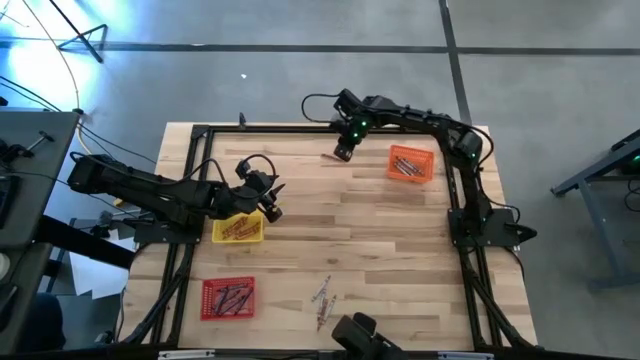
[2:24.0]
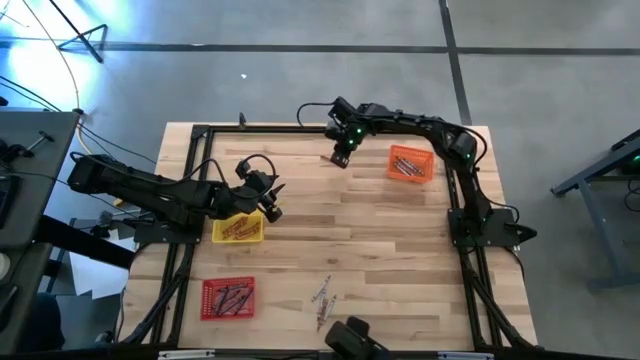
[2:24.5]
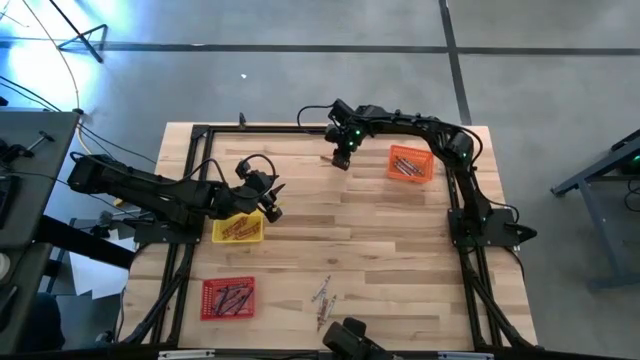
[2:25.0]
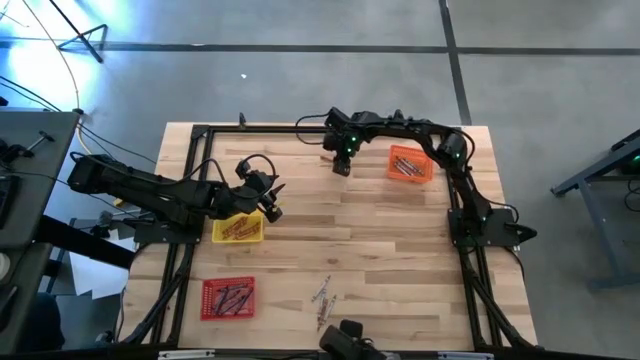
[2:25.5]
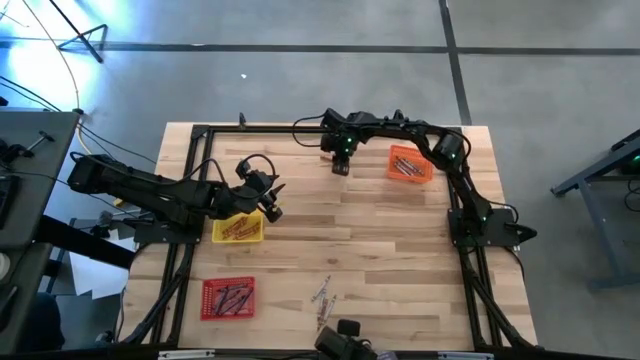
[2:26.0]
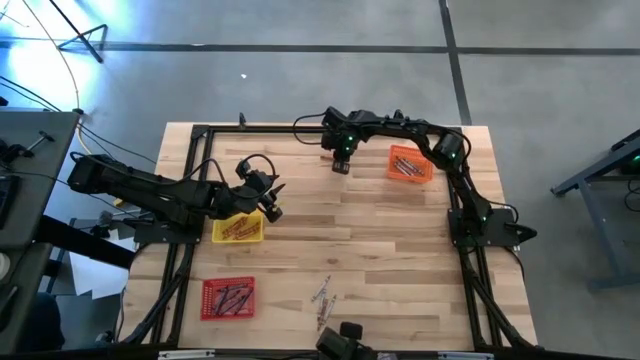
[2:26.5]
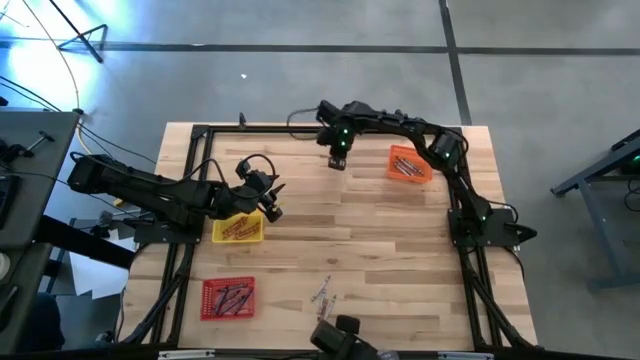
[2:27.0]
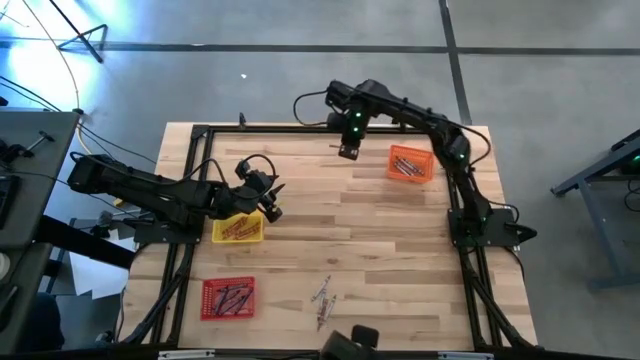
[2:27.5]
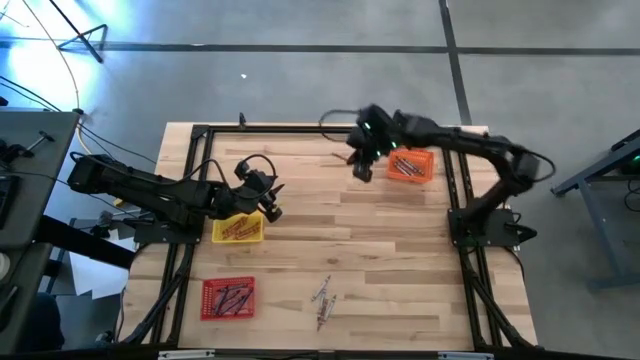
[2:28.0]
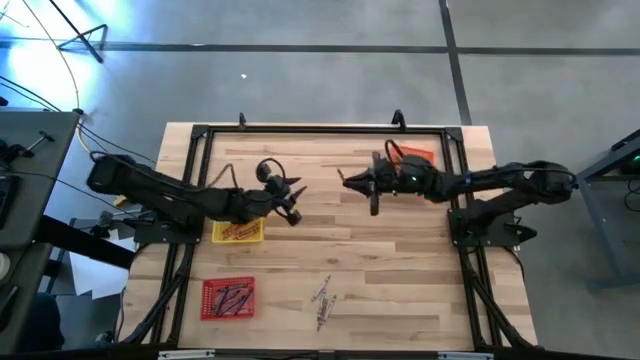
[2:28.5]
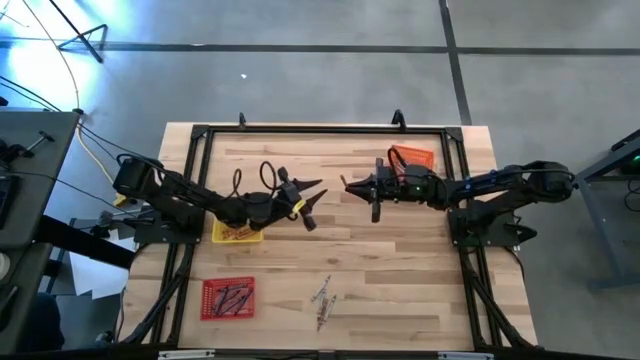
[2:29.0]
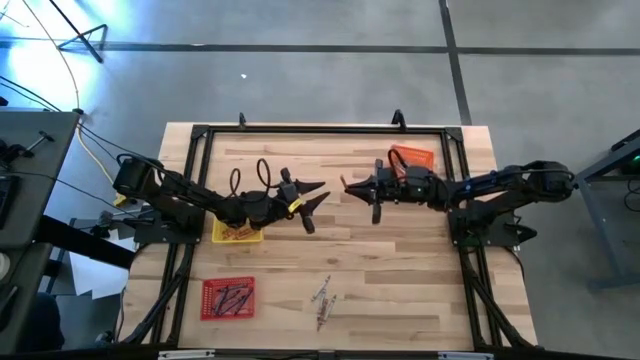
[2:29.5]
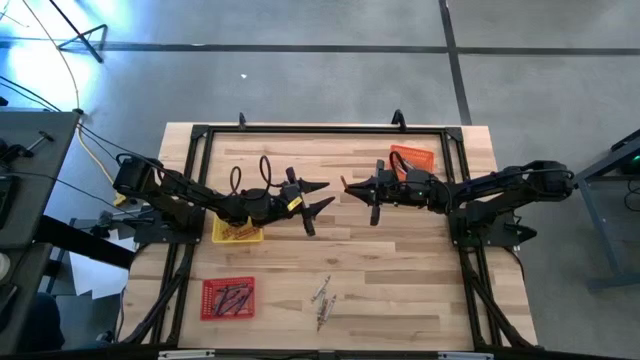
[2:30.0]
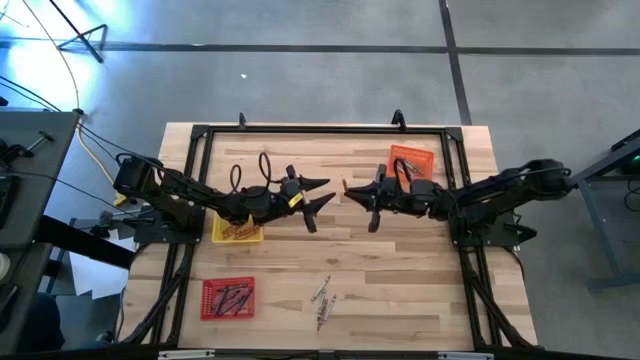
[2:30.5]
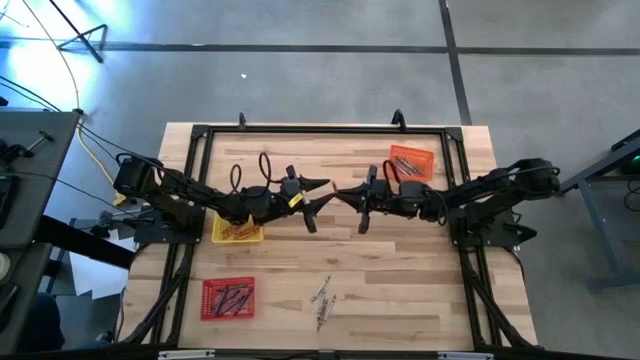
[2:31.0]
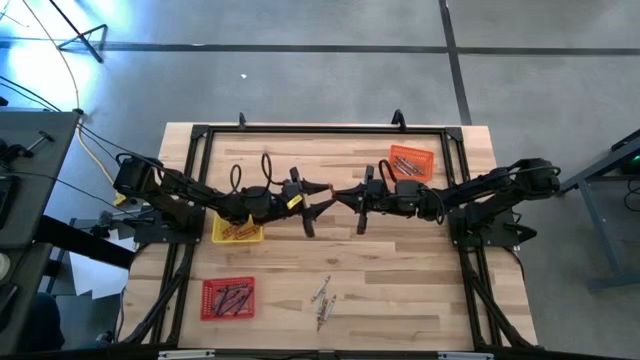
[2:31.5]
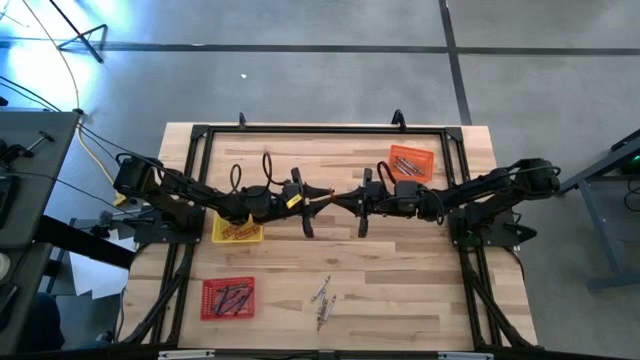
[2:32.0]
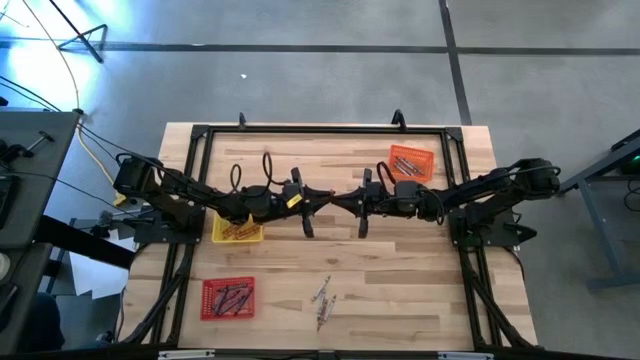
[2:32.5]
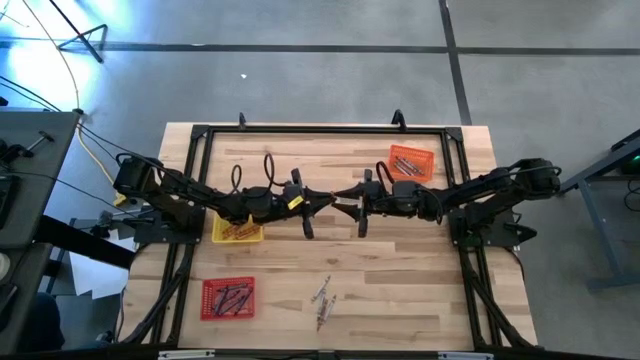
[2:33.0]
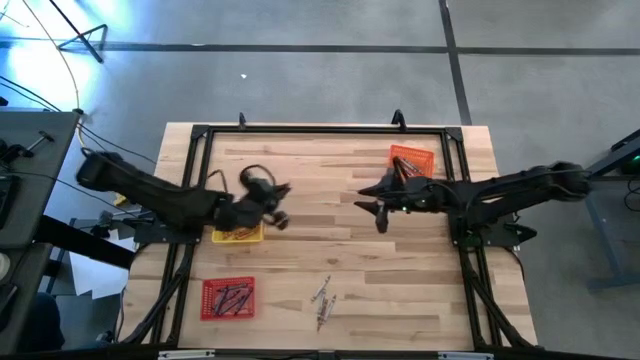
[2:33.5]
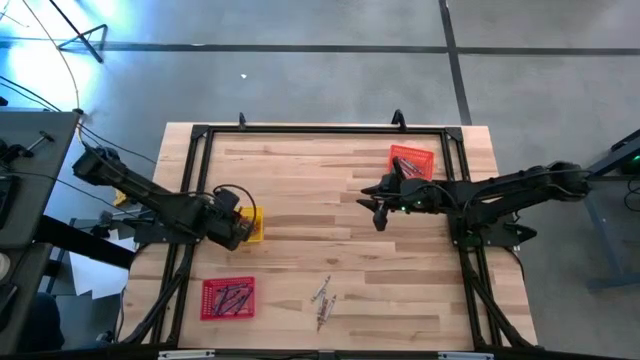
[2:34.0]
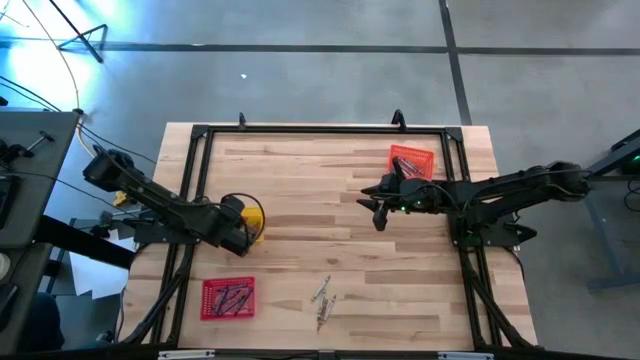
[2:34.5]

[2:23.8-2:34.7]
Task: Sort crayons
Put the orange crayon into the yellow bin

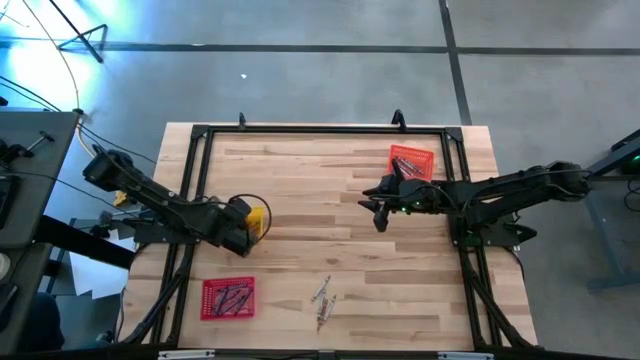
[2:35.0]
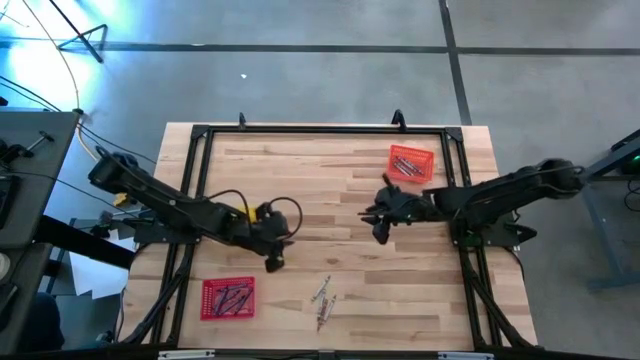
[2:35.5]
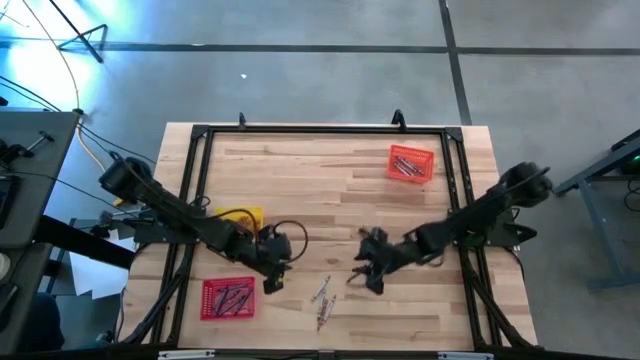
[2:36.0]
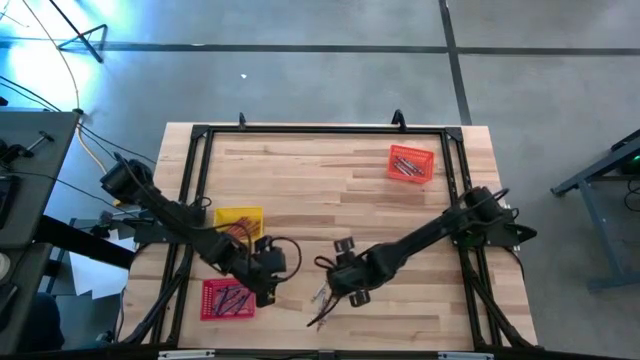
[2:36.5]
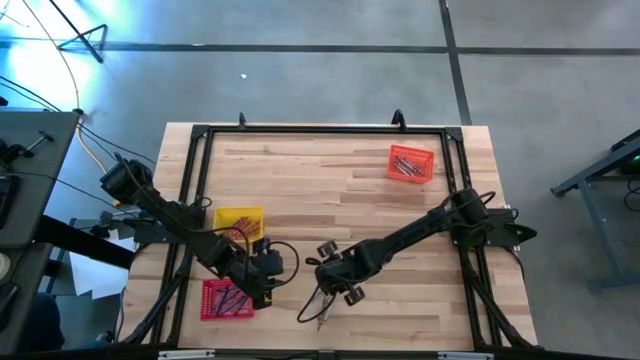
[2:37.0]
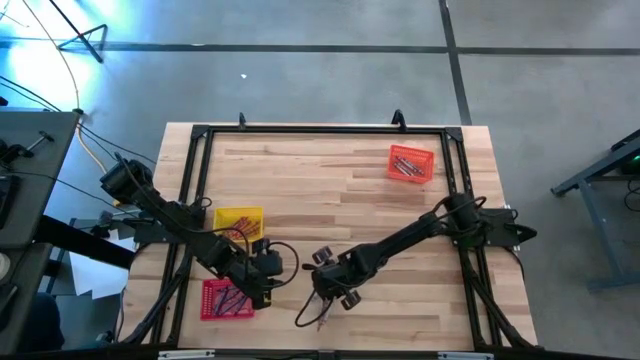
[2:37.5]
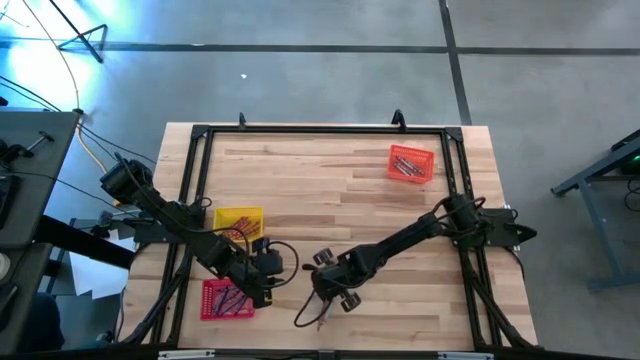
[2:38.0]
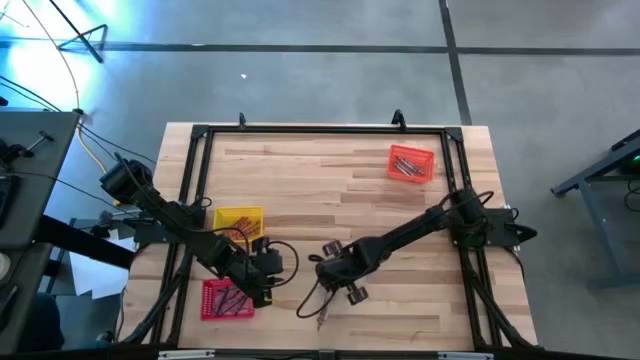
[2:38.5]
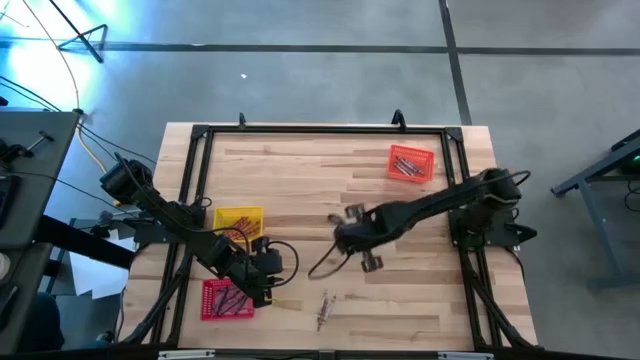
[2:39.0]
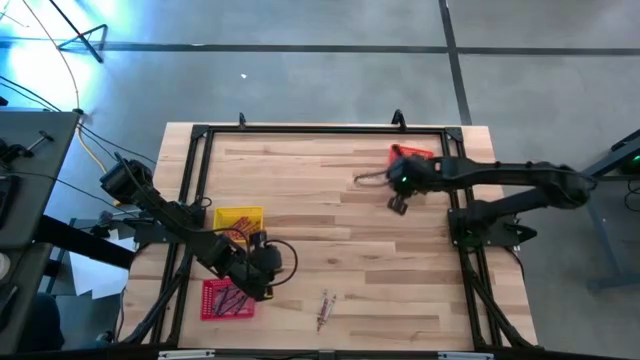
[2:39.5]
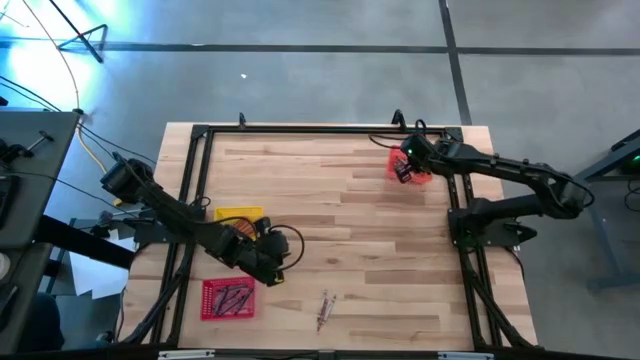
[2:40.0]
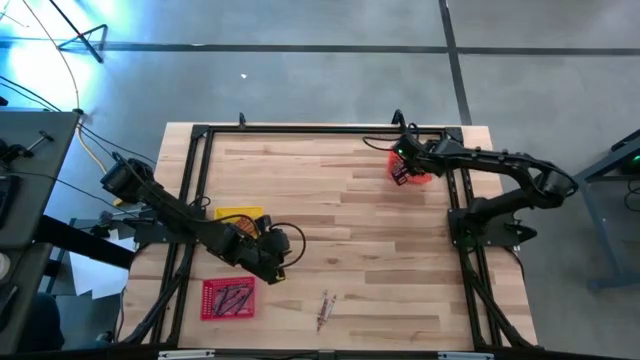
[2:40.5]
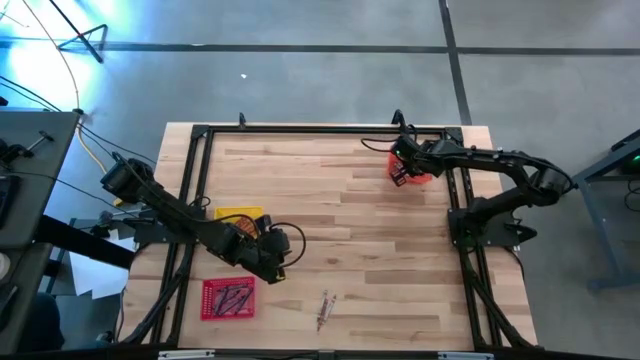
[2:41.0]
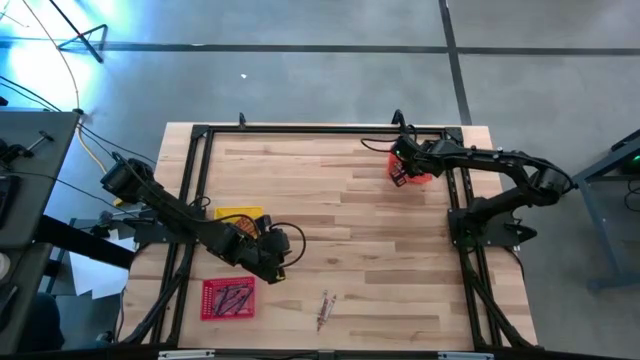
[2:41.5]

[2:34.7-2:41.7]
Put the gray crayon into the orange bin

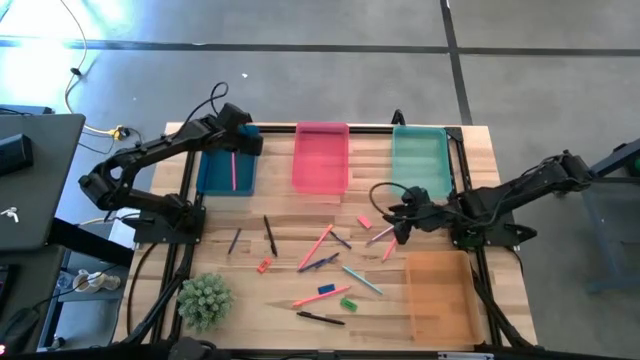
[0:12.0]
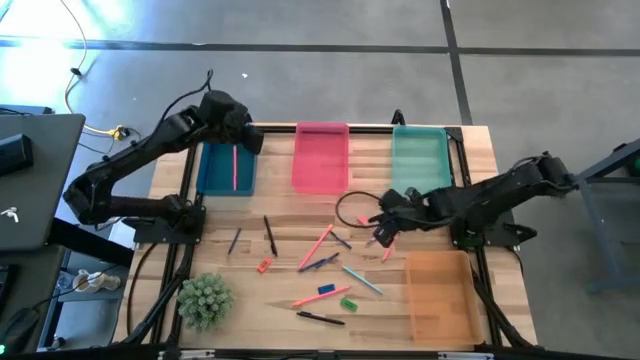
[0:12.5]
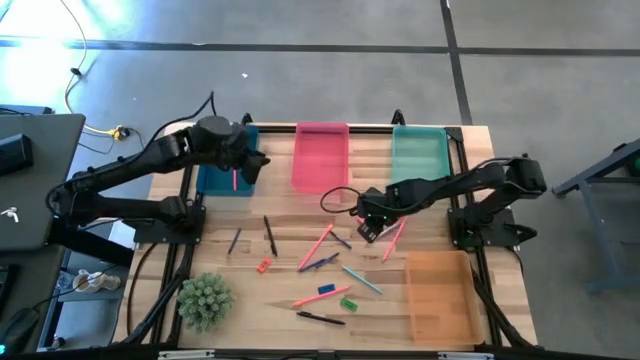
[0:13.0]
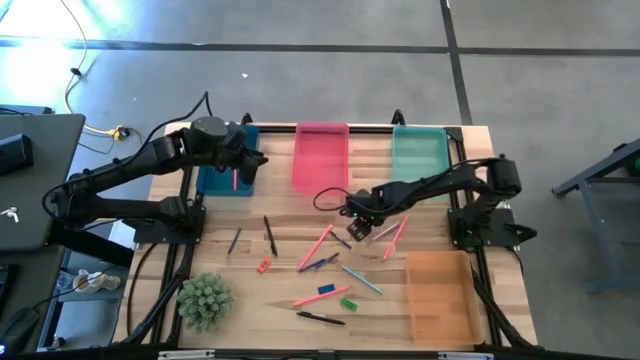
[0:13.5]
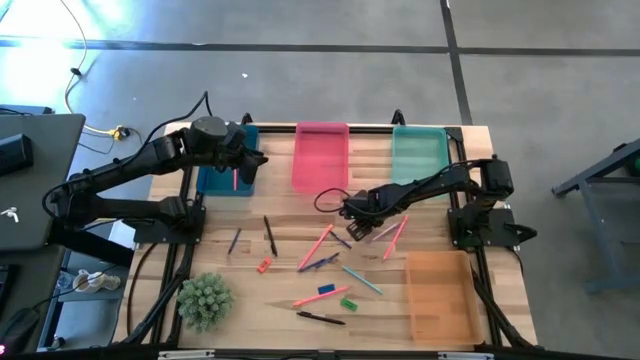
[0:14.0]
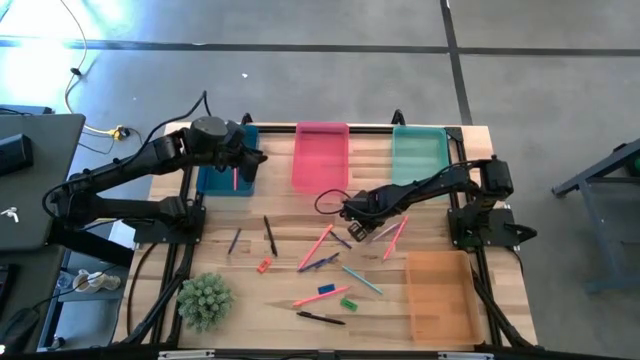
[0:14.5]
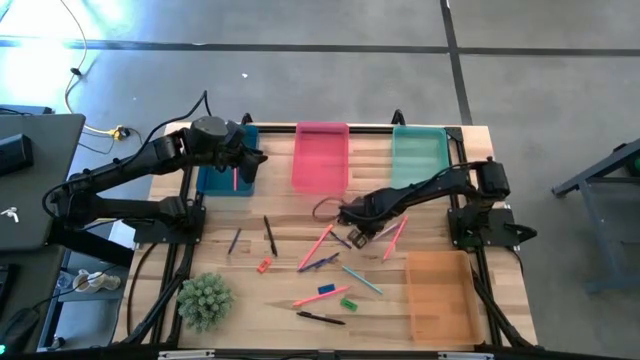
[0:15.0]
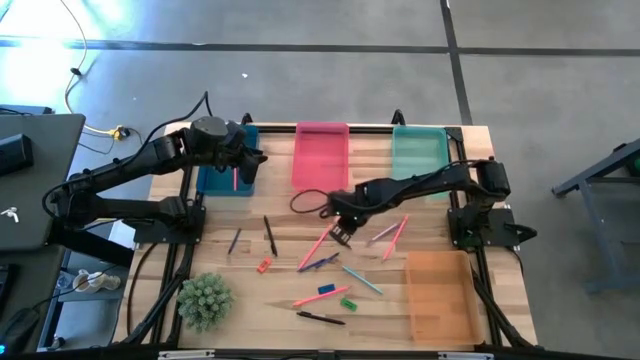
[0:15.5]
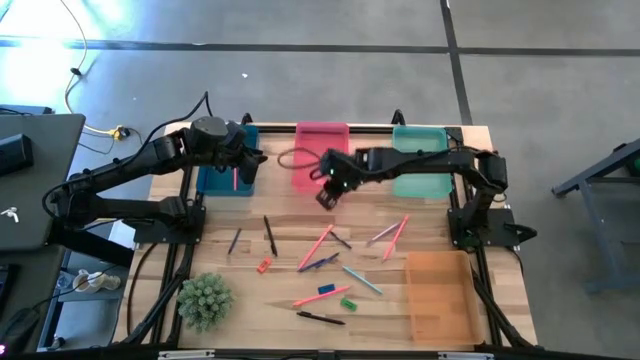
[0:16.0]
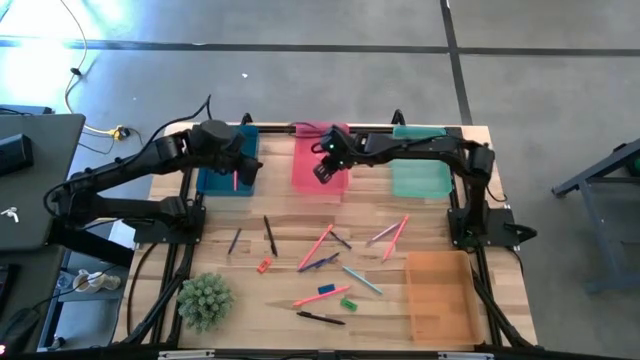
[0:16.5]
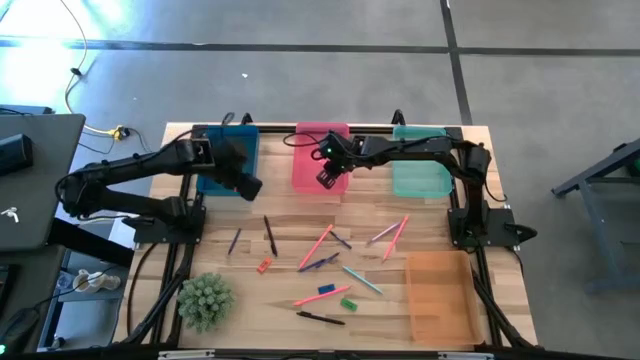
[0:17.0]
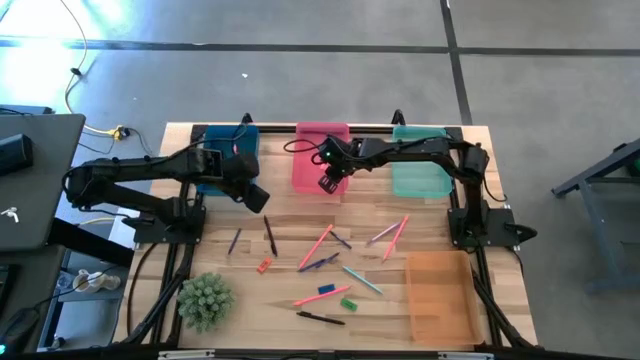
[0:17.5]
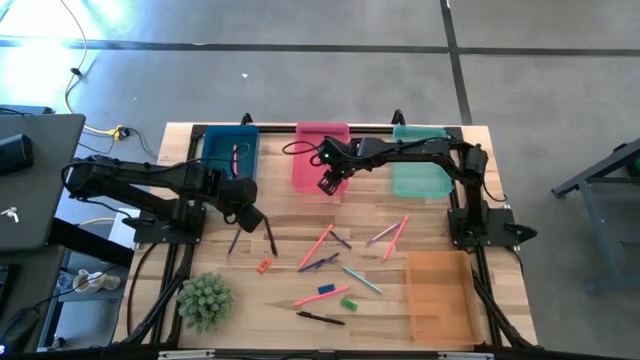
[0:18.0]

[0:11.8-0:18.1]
Task: Sort crayons/erasers/pens/pencils in bins
Put the pink eraser into the pink bin
